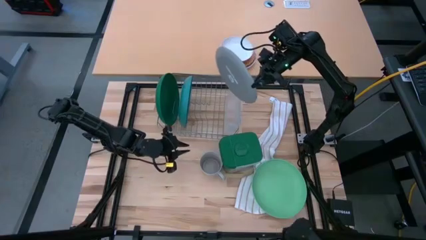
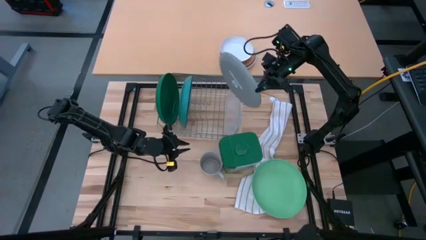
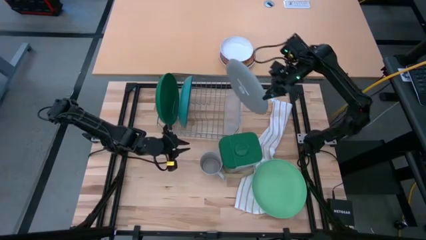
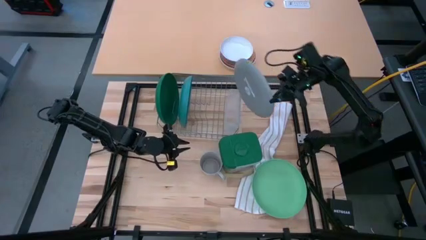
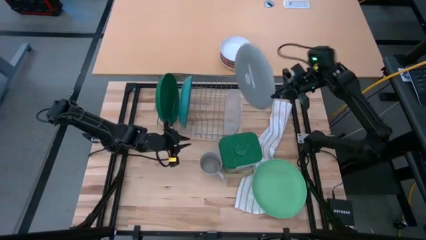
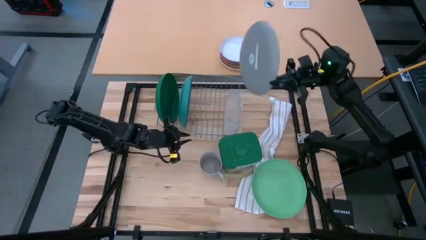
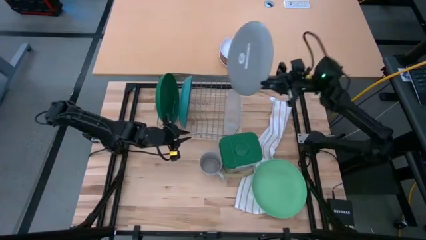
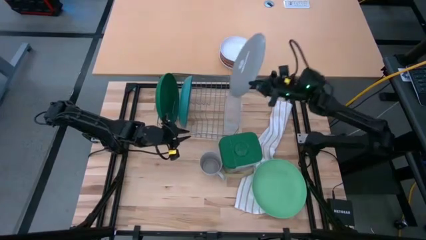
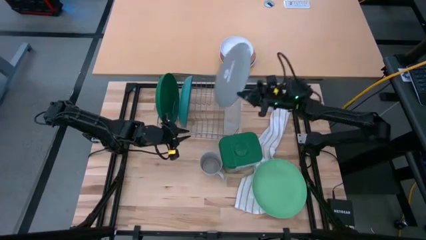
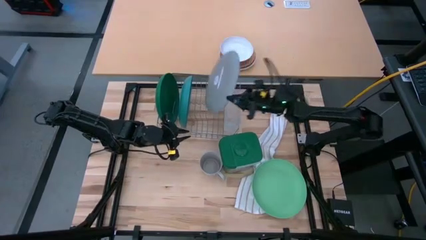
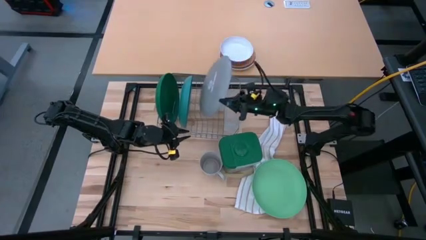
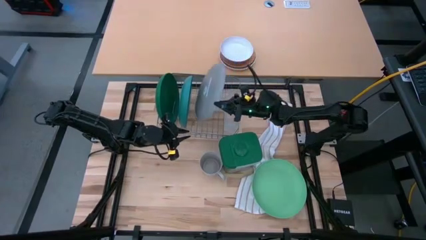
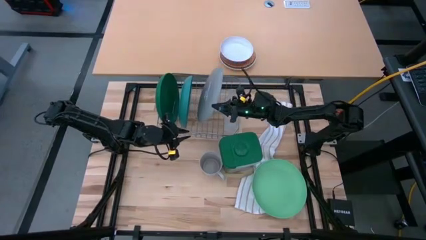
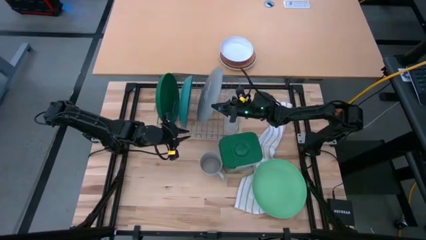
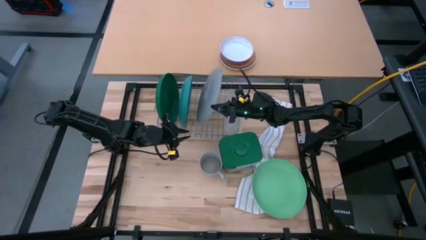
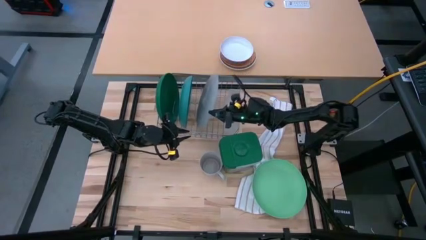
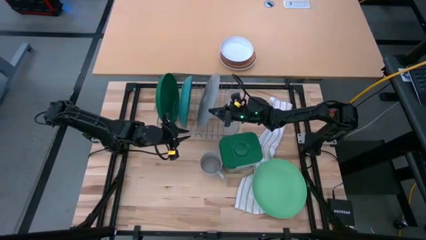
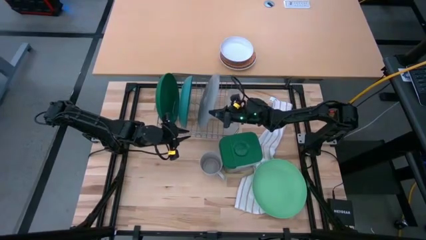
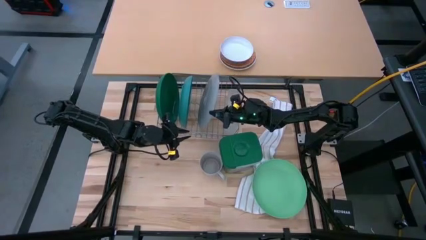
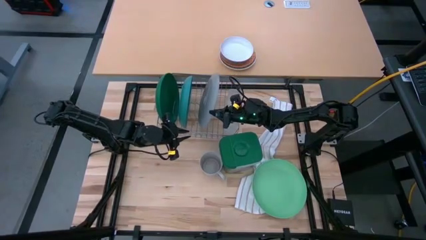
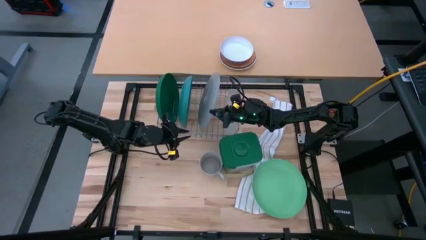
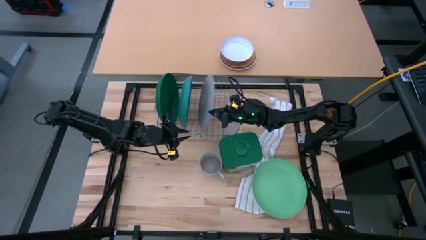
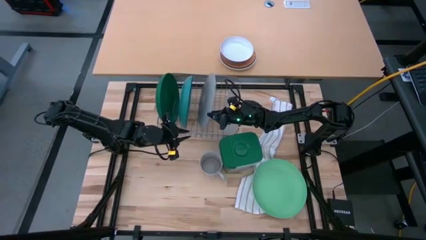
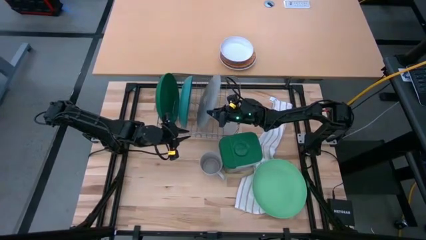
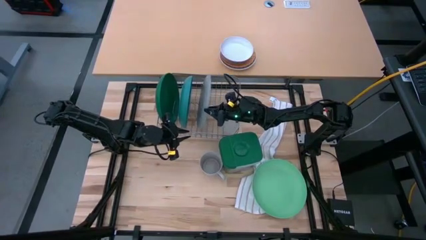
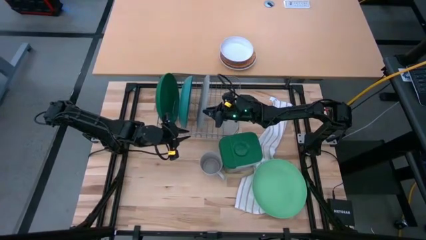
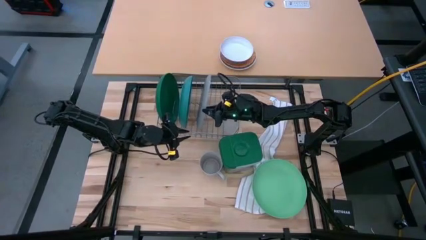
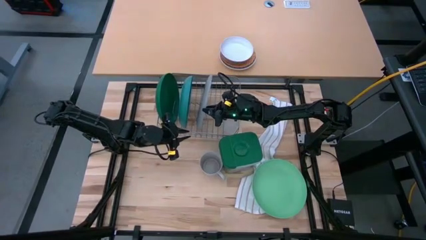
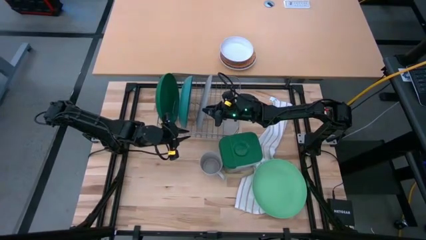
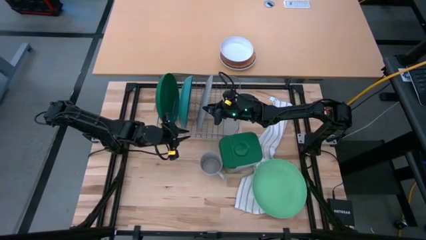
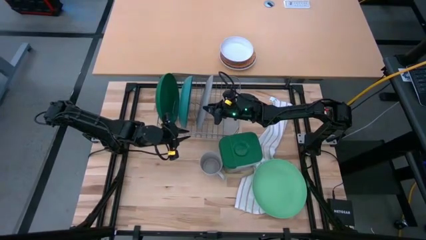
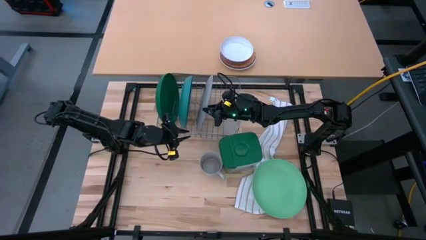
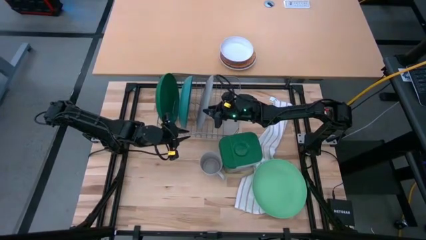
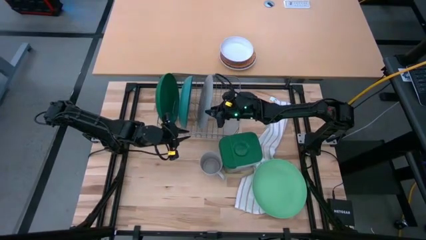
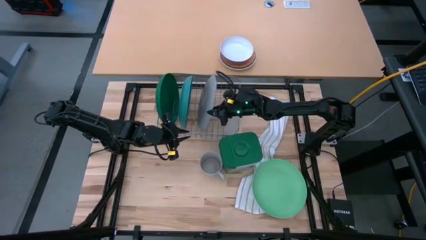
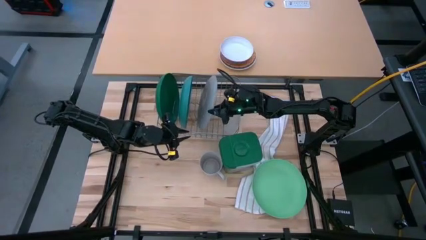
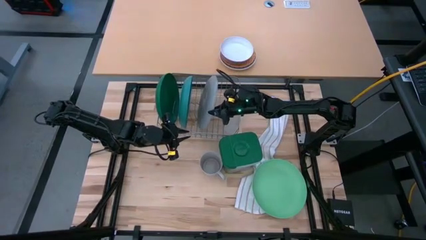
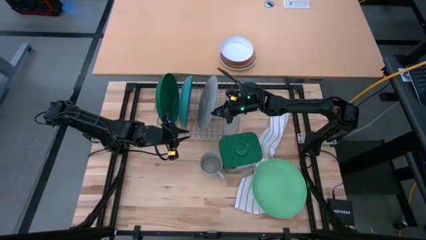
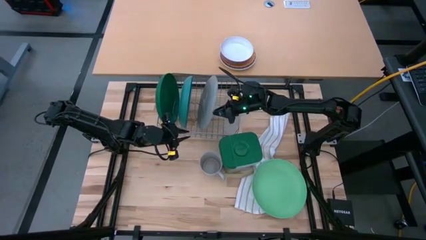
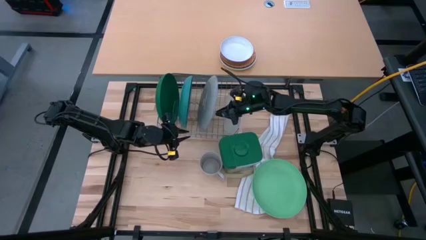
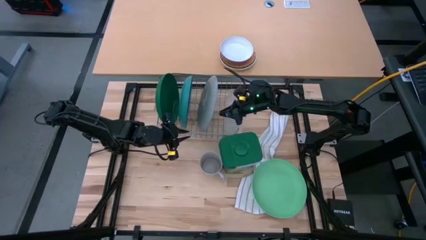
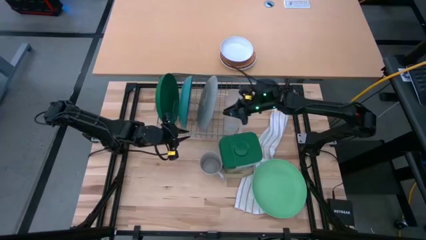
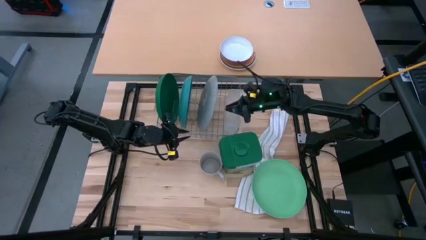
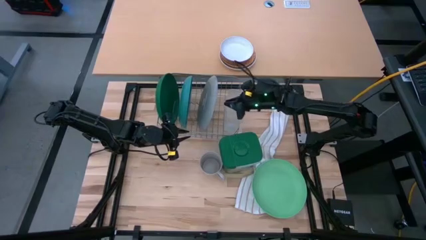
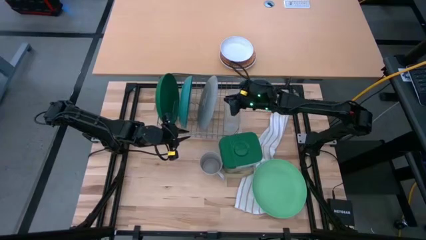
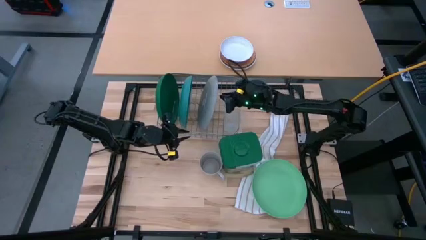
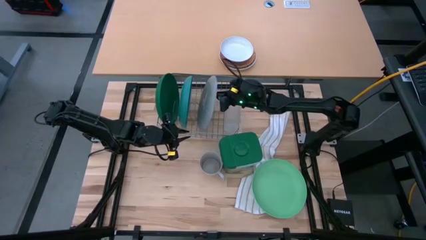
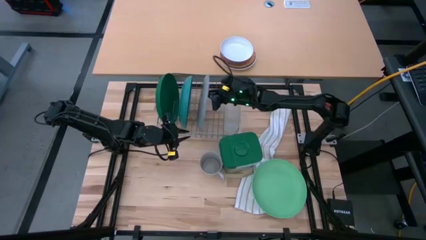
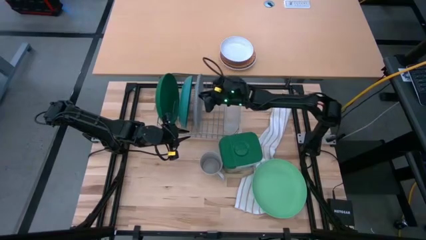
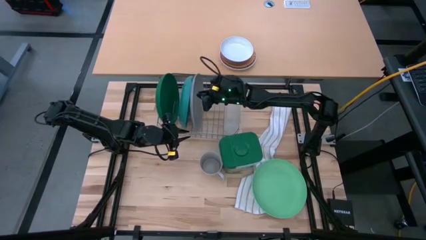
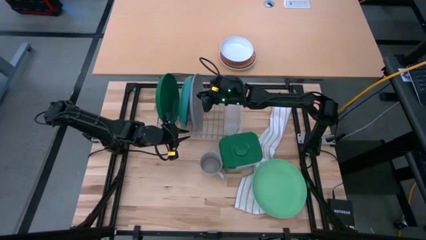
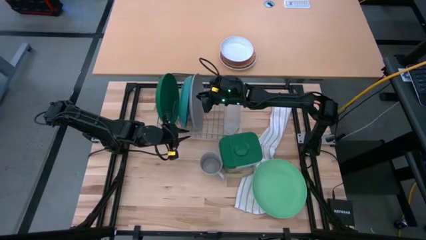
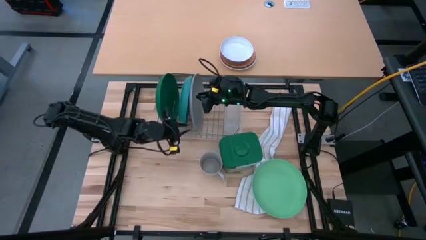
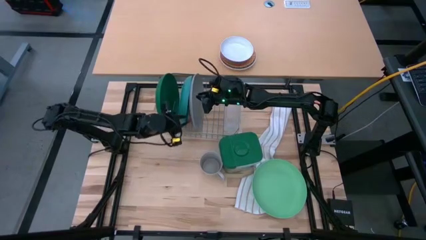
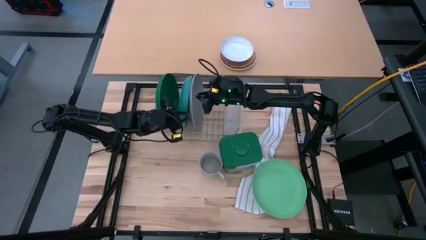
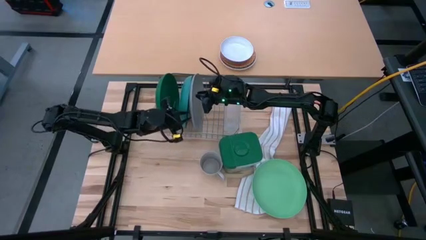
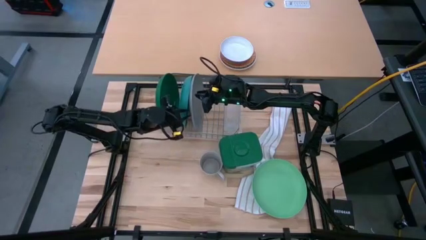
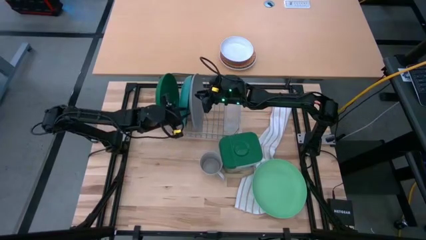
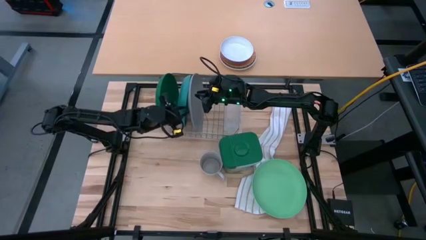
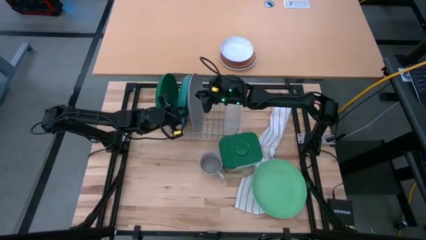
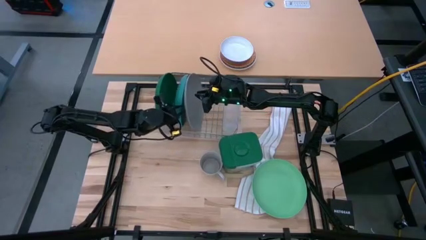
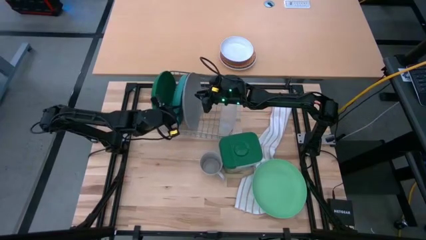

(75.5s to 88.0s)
Task: Sort dishes
Put the gray plate in the dish rack

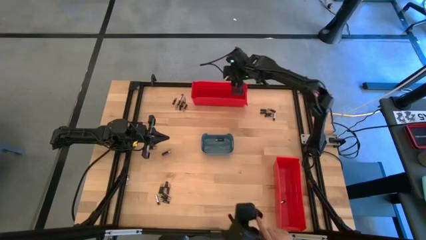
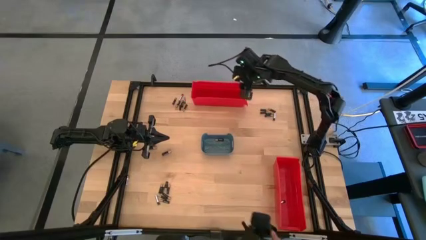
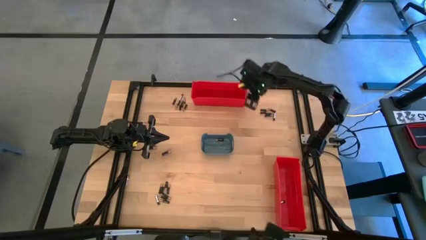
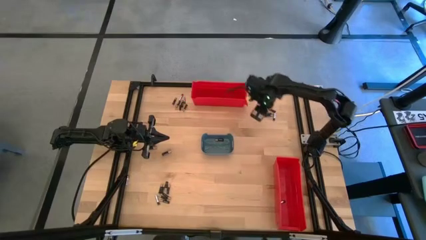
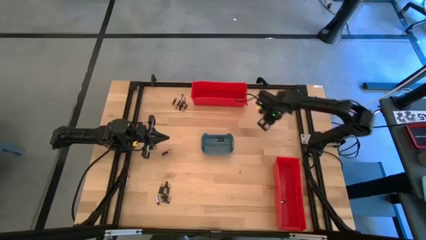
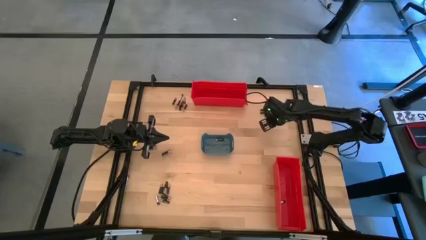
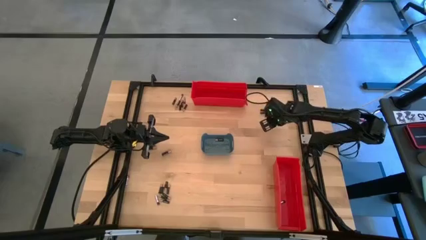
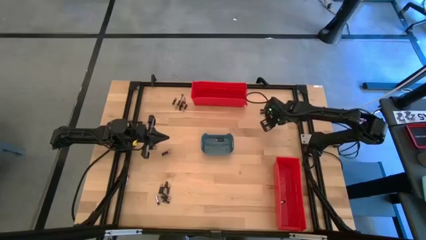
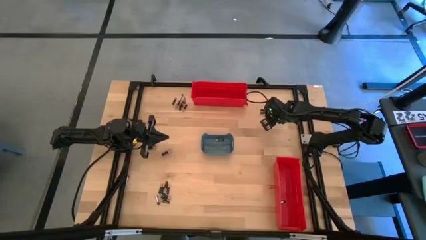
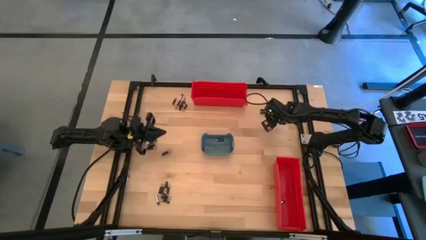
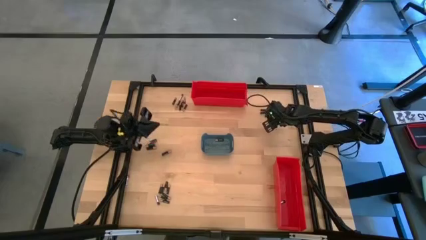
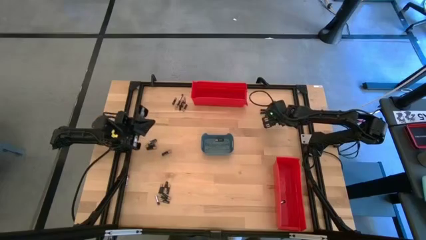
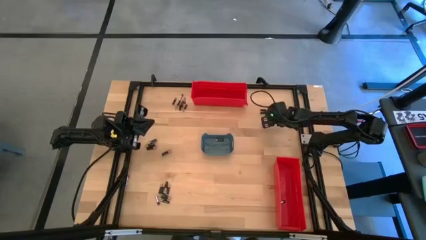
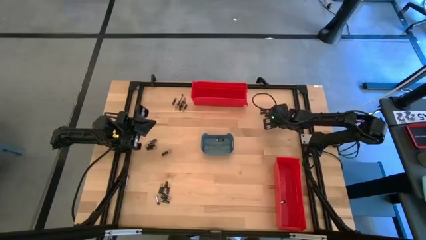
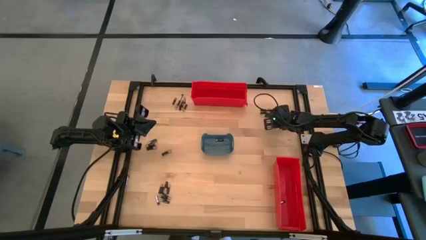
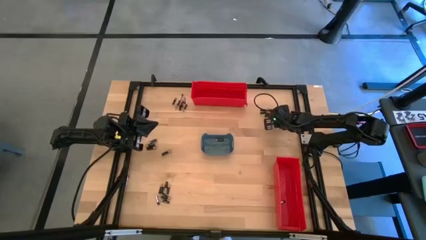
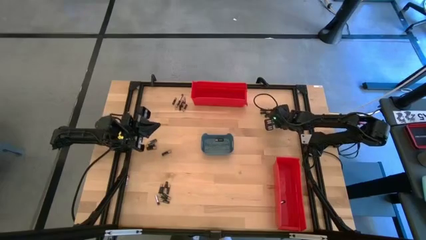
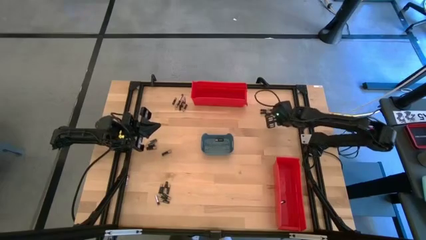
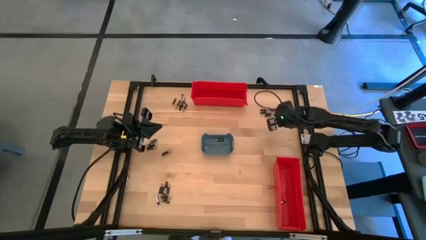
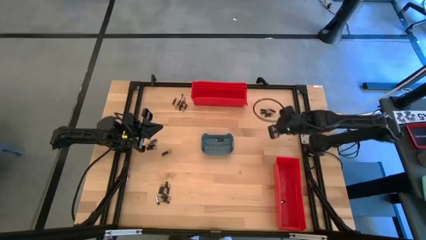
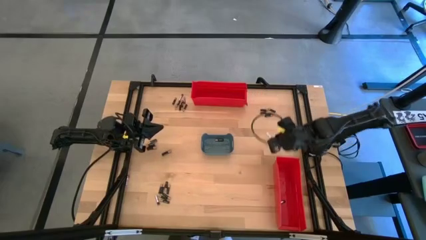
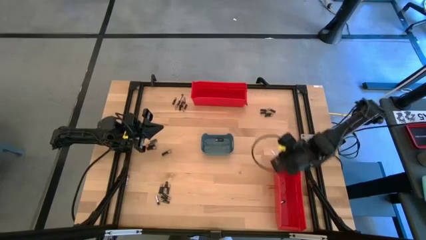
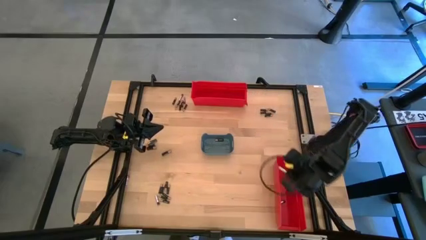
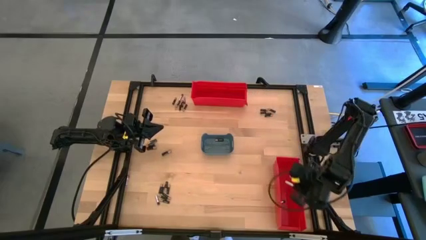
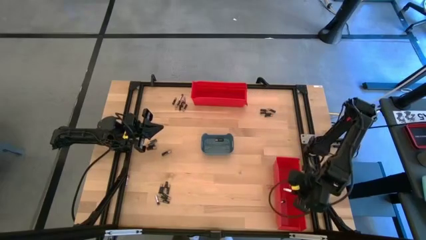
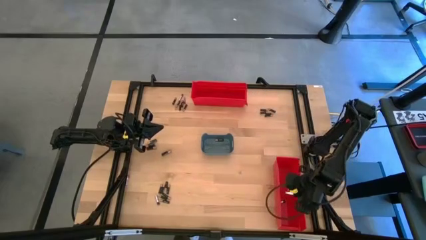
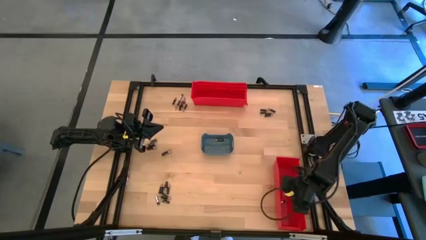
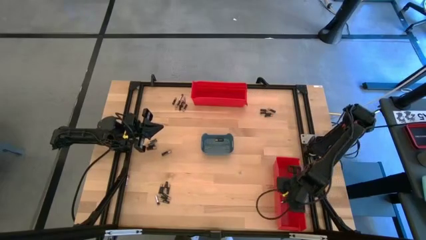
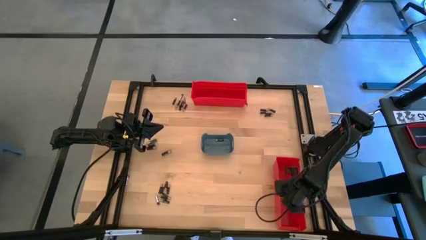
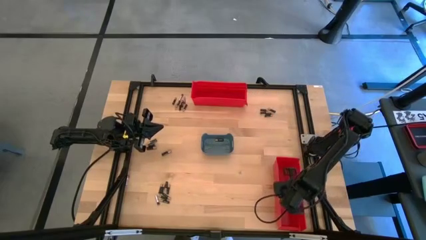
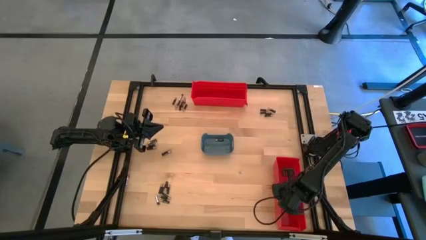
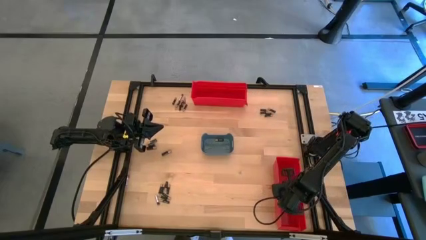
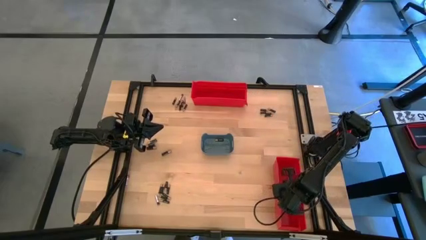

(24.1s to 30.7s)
Task: Sort batteries
Put the silver battery into the bottom red bin
